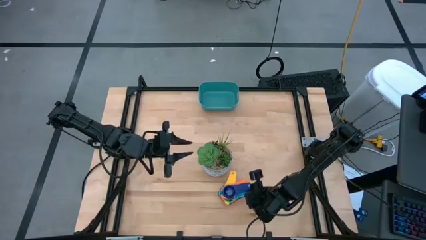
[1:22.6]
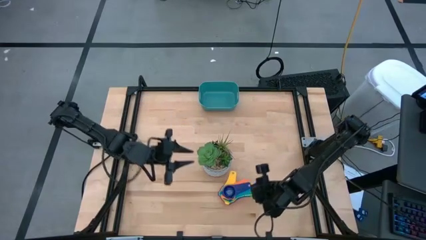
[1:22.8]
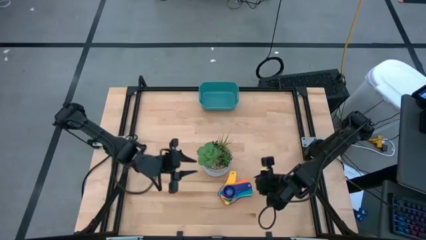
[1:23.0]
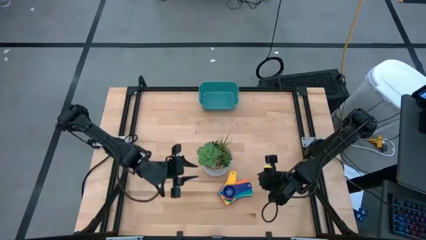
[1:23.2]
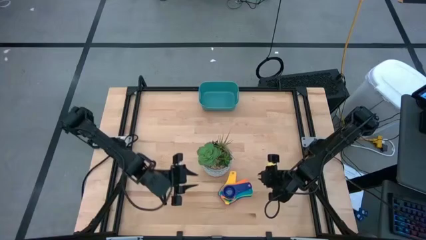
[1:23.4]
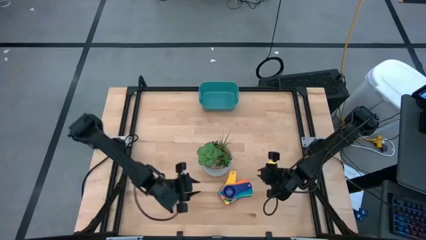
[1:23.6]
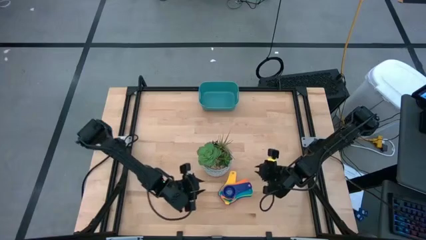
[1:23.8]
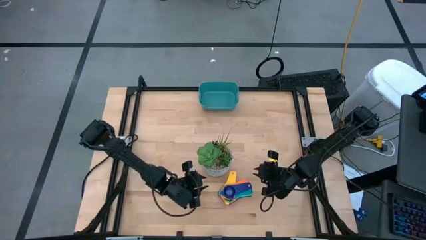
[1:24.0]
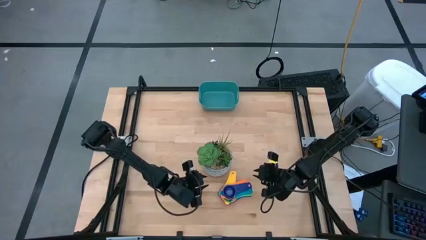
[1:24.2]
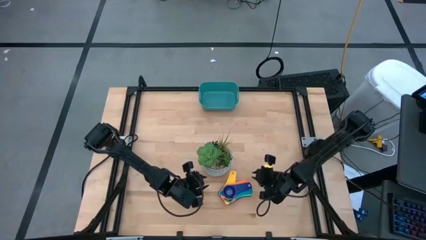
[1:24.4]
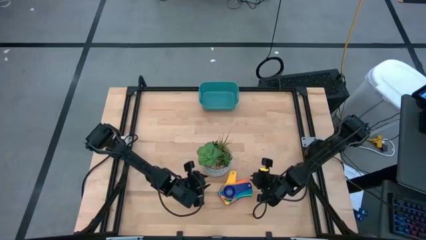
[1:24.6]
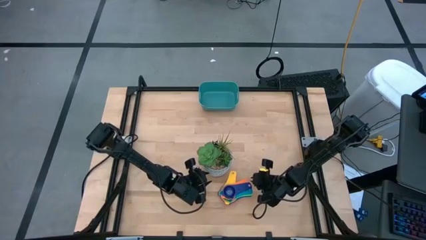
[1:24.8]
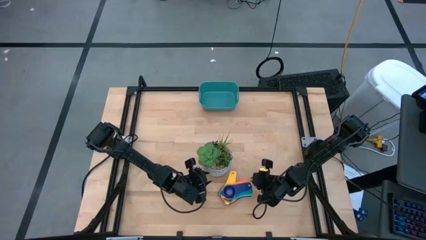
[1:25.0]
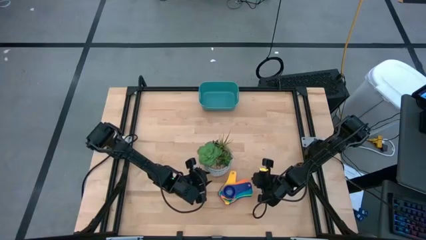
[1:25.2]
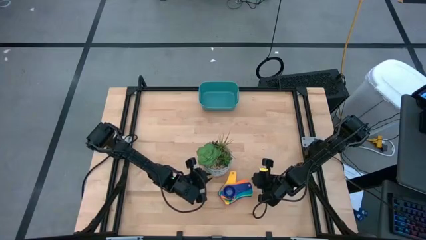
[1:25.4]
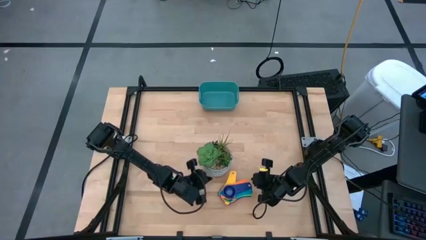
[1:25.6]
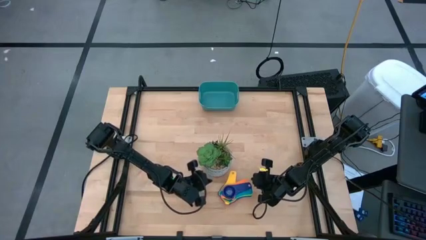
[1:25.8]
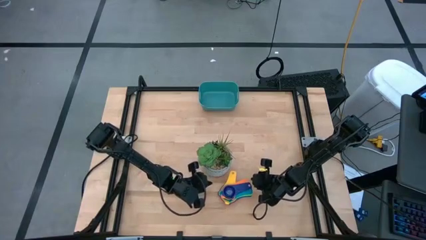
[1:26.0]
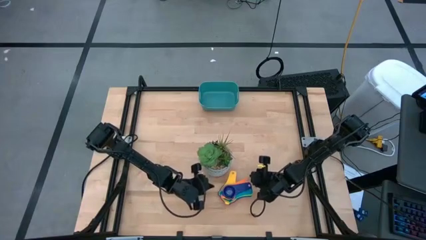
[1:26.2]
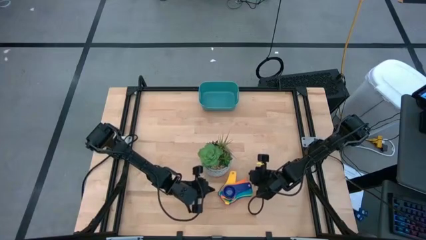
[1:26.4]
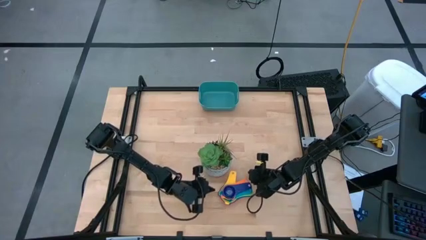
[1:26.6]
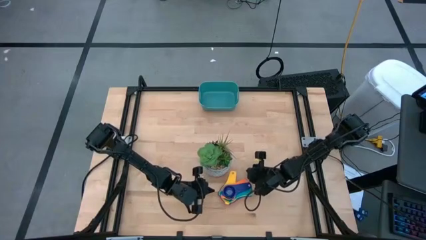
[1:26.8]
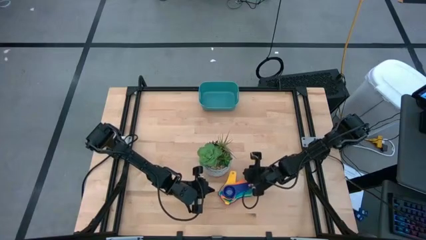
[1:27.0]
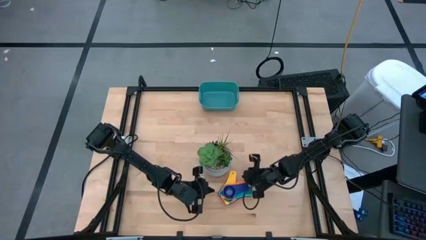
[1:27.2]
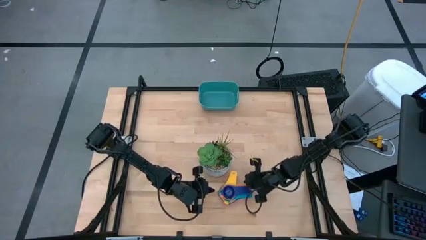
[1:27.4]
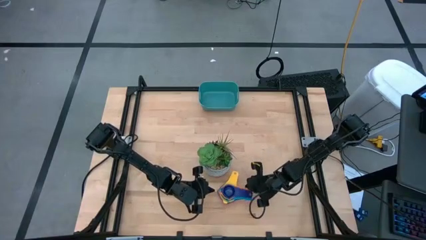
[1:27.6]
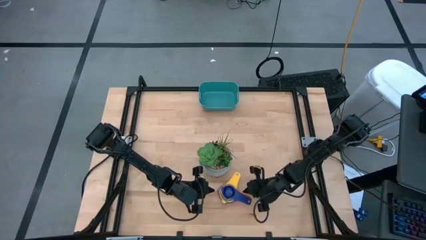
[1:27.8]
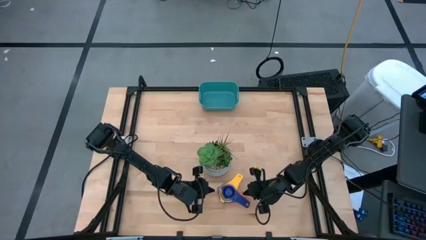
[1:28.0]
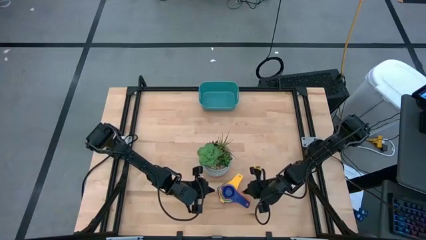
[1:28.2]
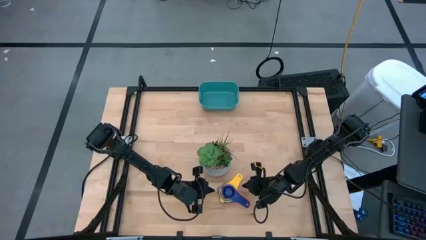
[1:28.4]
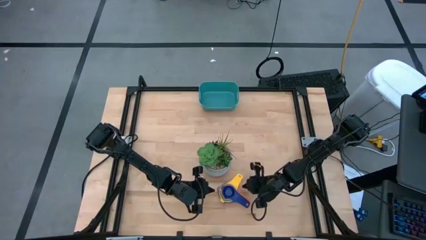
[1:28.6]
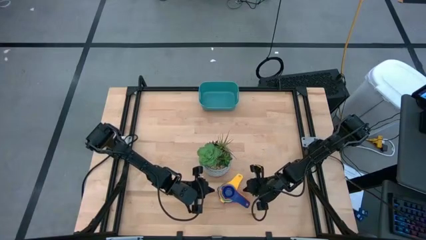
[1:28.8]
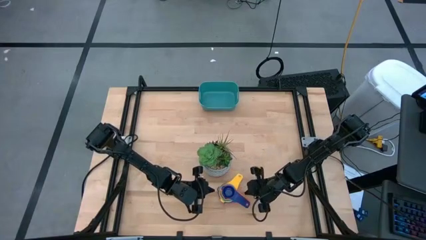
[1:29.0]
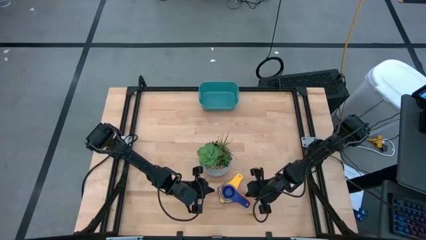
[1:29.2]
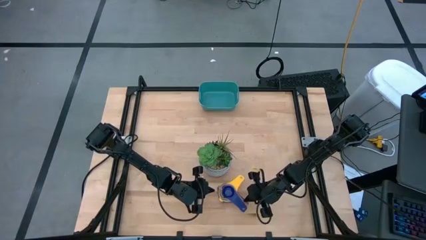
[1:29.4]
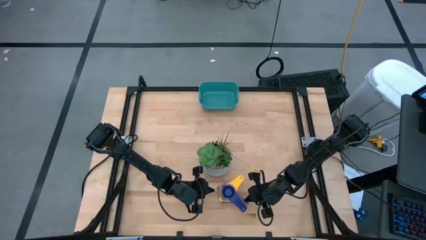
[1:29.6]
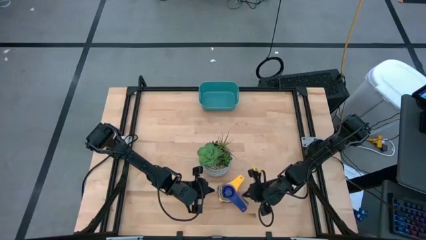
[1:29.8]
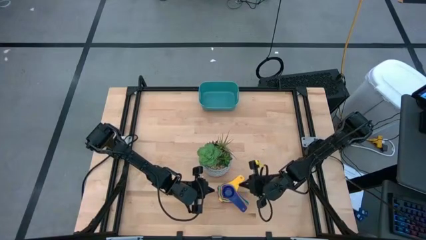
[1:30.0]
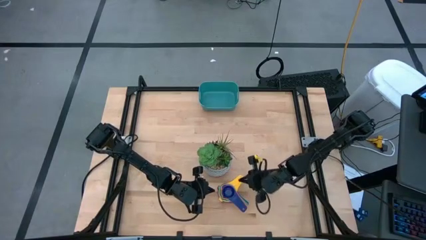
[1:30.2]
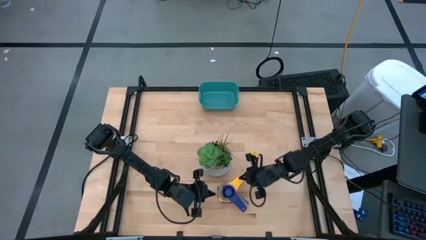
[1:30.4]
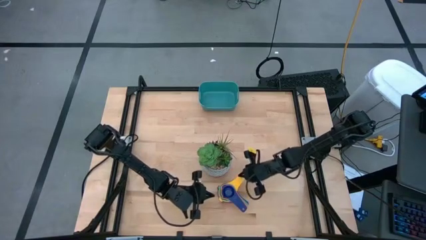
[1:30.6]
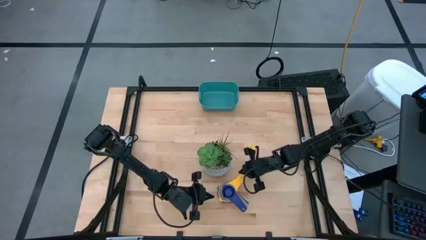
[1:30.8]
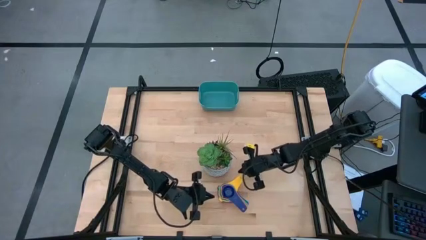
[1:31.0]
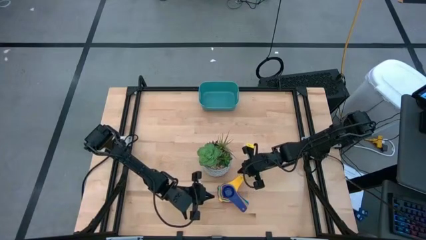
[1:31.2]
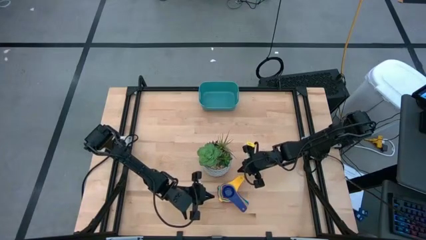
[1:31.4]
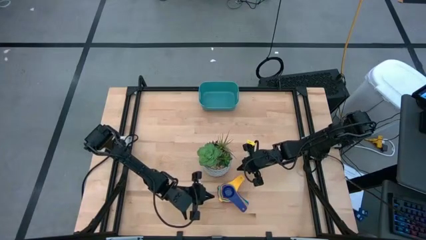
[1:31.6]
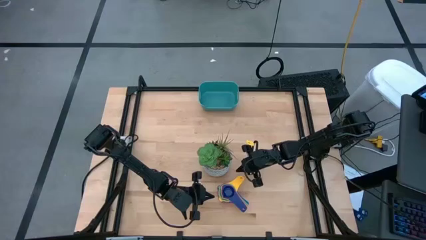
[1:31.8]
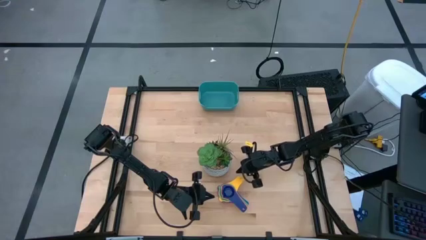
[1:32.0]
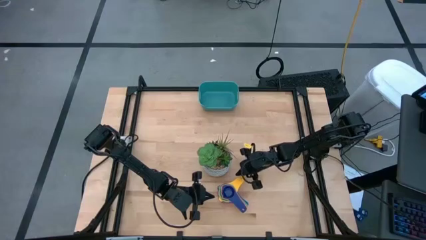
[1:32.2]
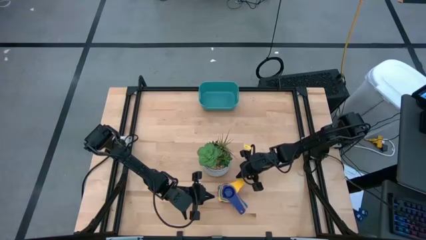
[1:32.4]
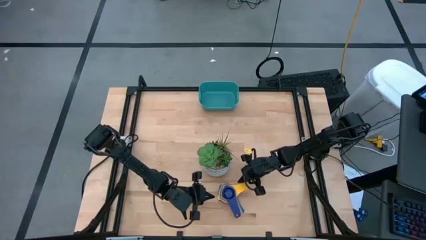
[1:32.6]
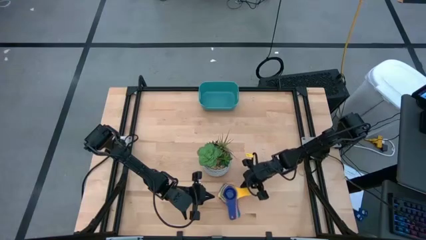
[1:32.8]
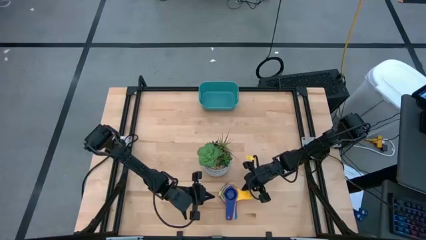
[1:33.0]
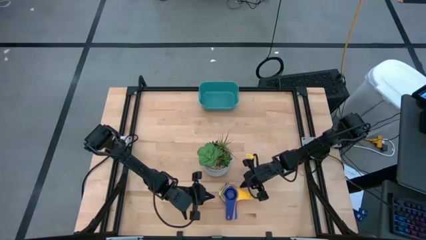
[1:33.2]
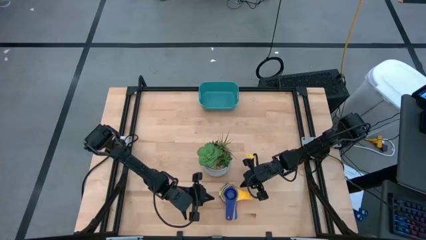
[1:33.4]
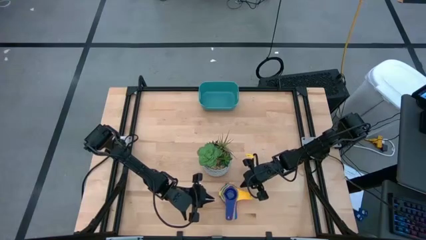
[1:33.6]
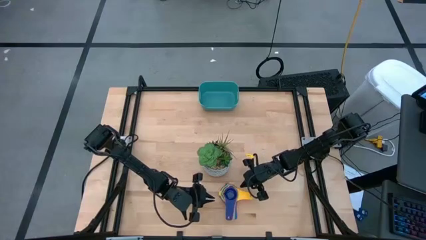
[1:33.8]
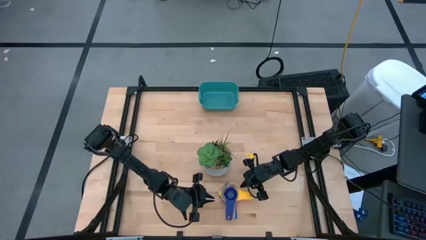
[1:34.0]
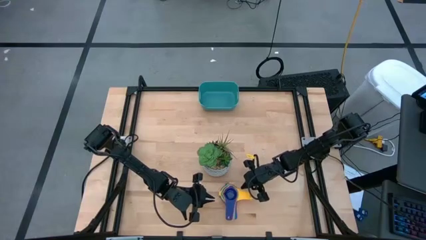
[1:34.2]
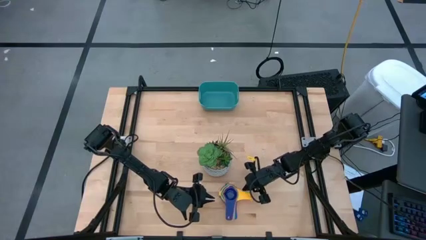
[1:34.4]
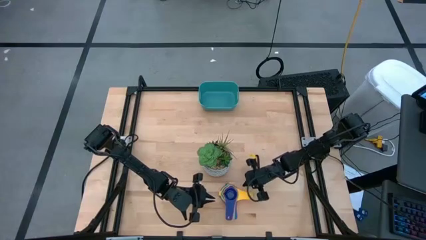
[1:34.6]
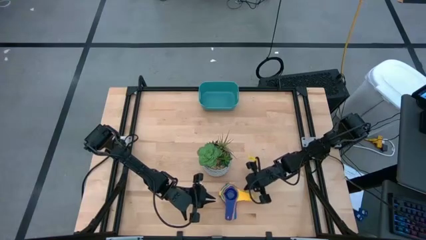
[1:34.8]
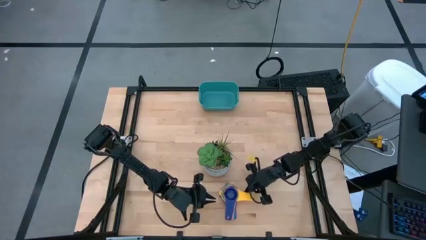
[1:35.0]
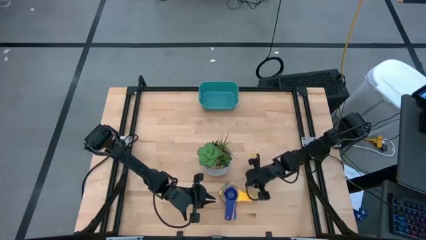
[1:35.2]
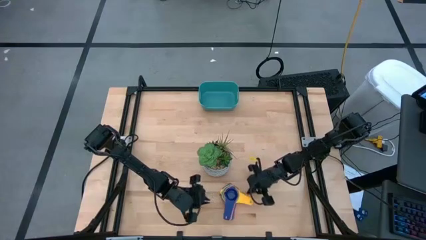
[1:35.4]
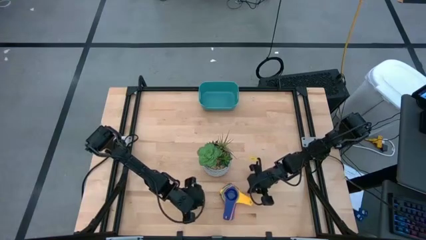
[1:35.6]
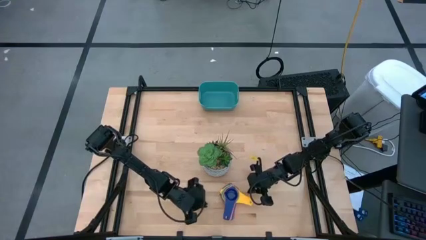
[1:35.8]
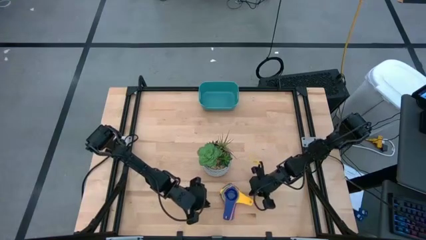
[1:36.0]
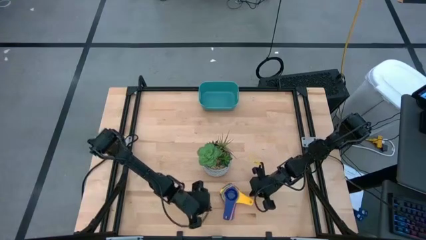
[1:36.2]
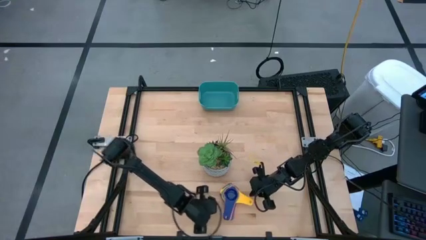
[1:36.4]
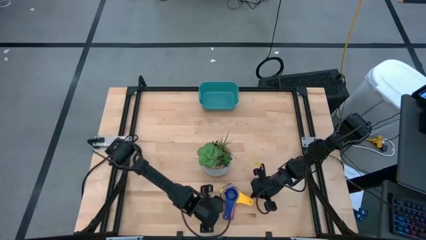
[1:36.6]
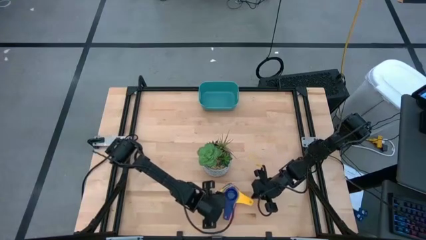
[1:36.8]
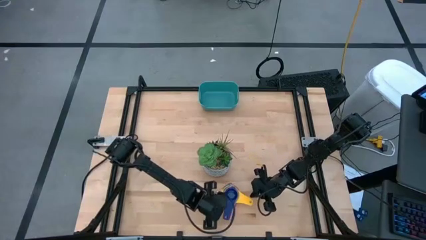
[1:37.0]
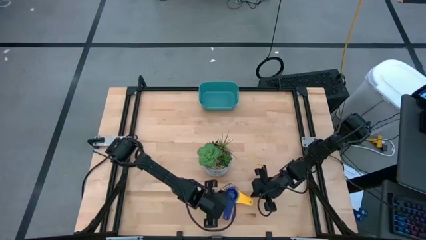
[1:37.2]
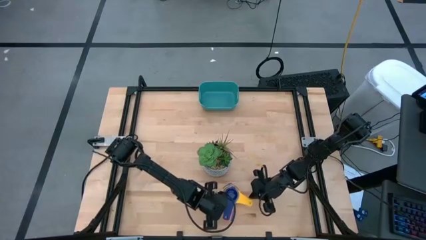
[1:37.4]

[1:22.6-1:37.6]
Task: Nest measuring cups in basket
Adjust the nested measuring cups
